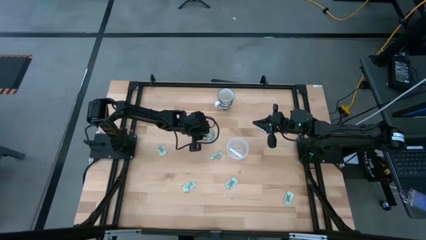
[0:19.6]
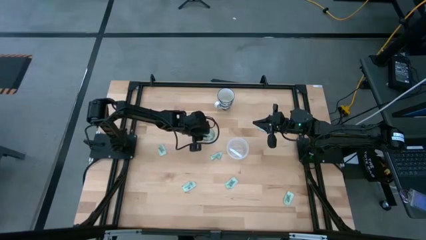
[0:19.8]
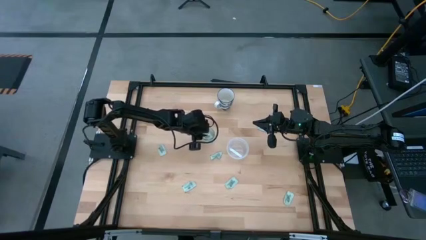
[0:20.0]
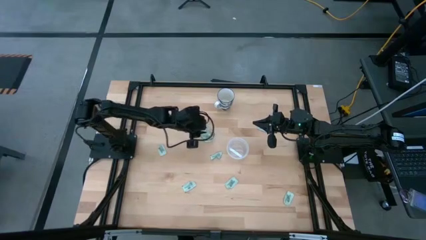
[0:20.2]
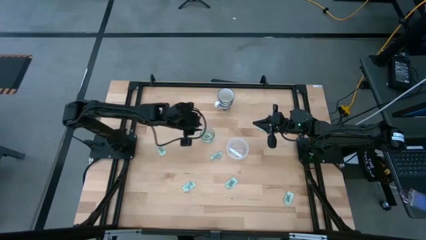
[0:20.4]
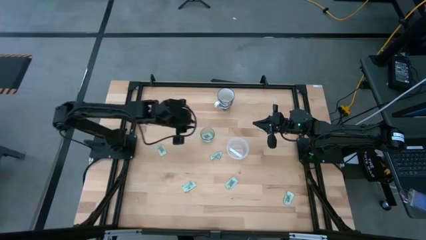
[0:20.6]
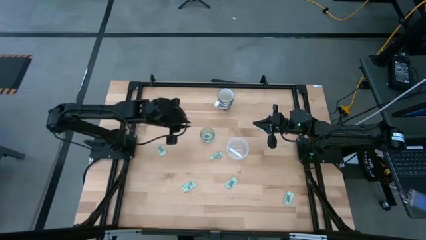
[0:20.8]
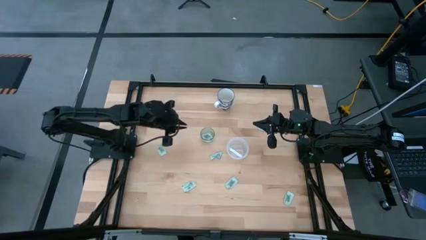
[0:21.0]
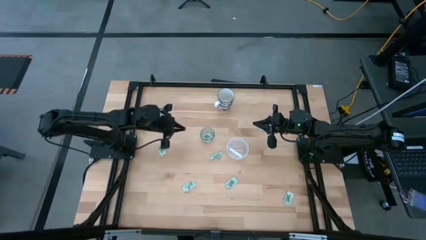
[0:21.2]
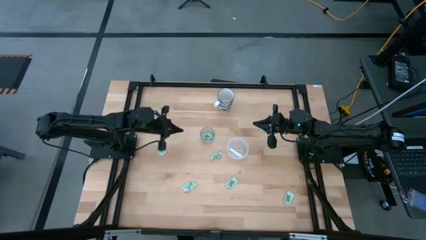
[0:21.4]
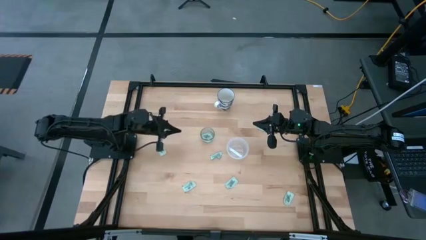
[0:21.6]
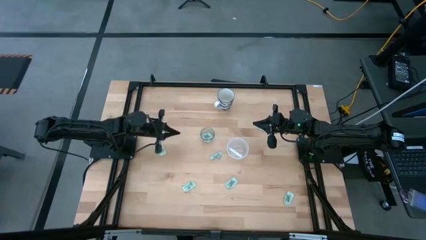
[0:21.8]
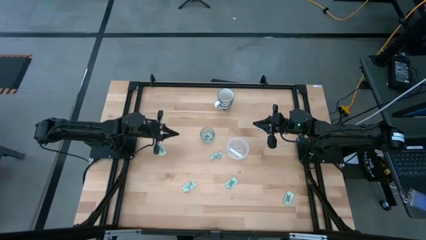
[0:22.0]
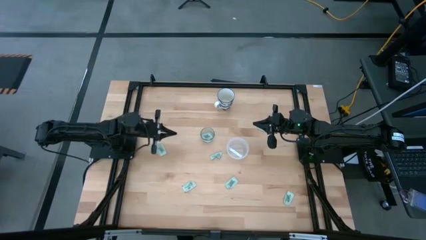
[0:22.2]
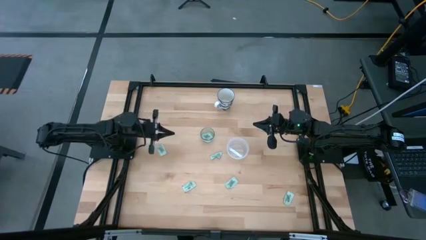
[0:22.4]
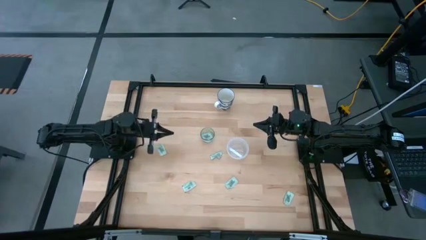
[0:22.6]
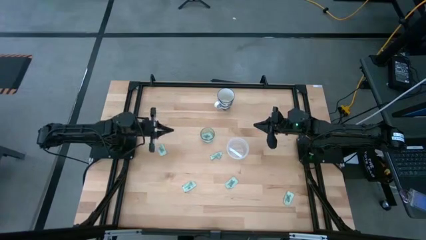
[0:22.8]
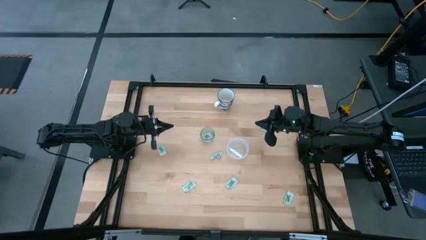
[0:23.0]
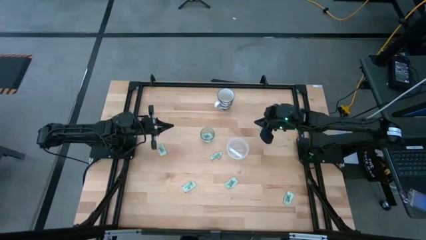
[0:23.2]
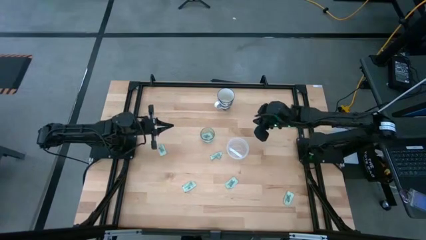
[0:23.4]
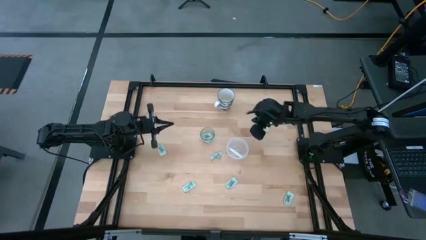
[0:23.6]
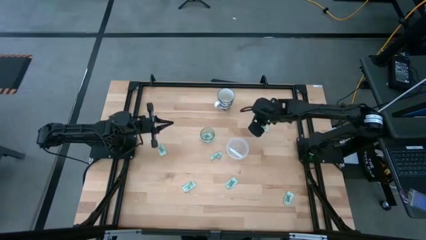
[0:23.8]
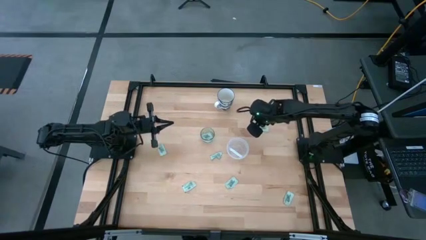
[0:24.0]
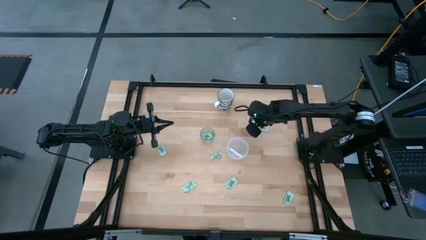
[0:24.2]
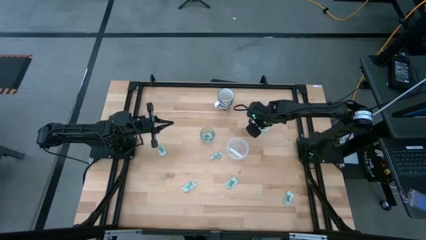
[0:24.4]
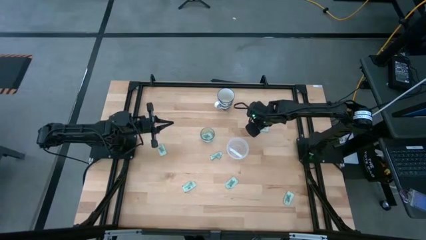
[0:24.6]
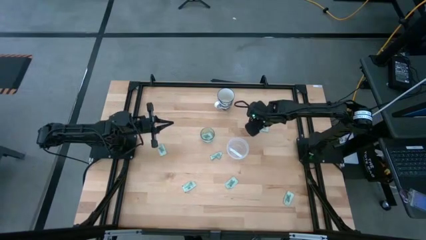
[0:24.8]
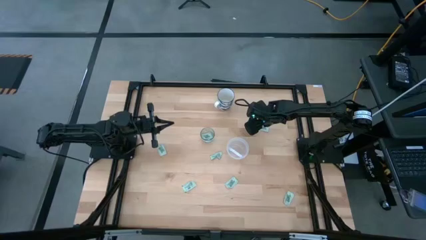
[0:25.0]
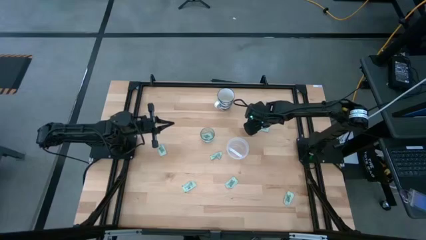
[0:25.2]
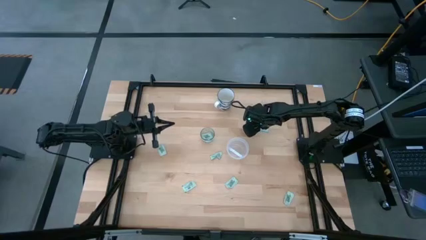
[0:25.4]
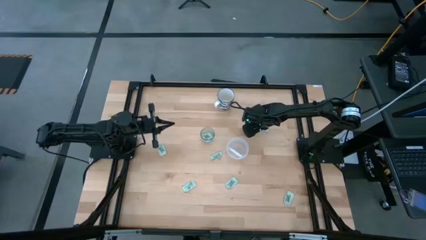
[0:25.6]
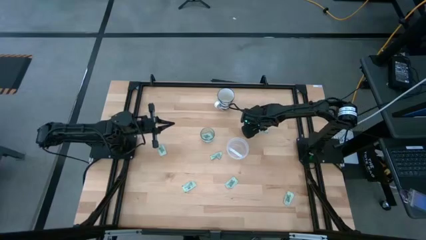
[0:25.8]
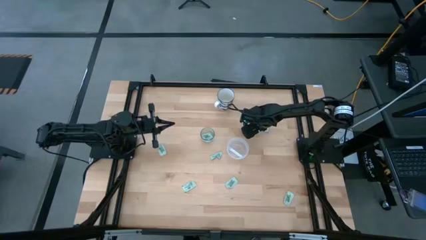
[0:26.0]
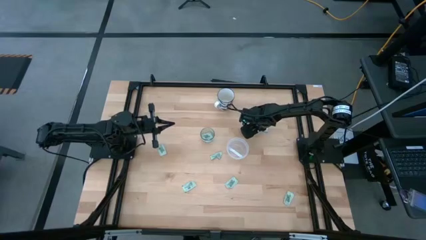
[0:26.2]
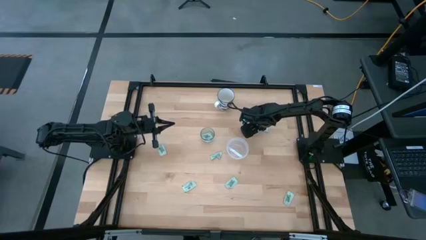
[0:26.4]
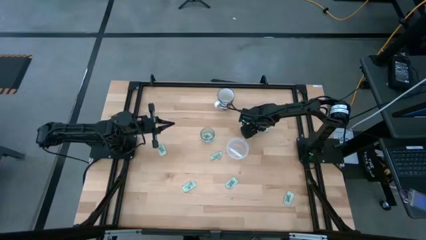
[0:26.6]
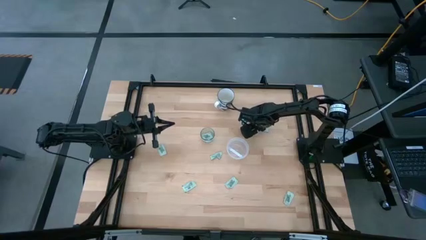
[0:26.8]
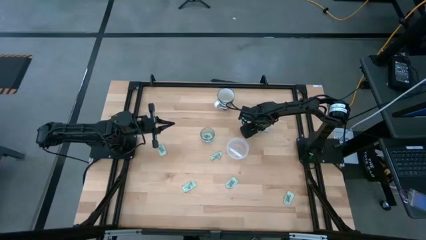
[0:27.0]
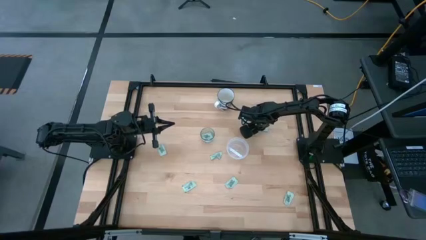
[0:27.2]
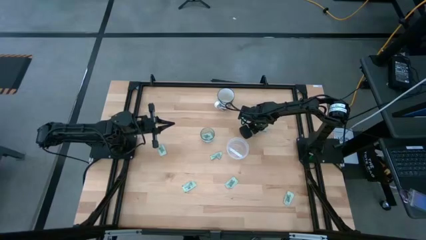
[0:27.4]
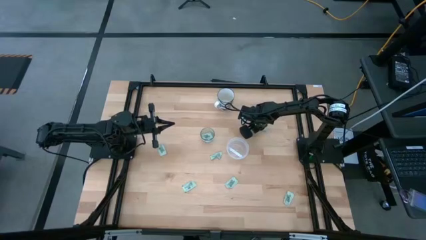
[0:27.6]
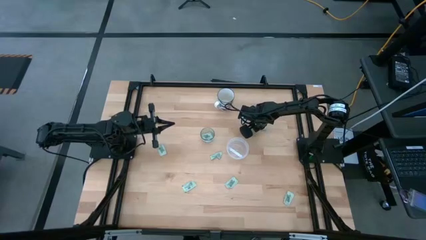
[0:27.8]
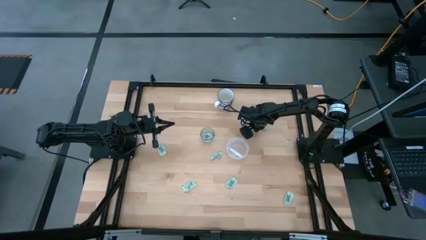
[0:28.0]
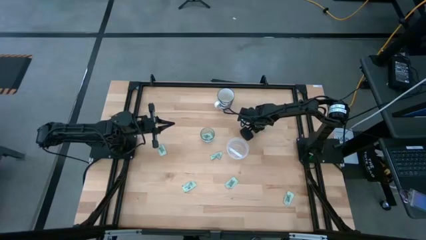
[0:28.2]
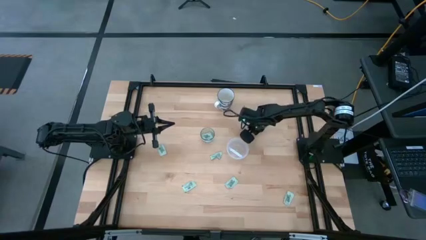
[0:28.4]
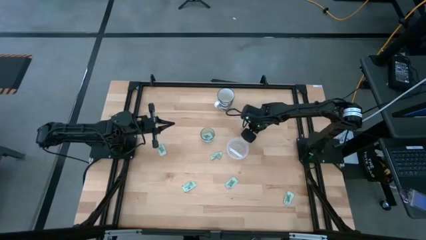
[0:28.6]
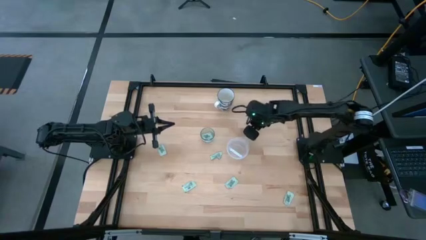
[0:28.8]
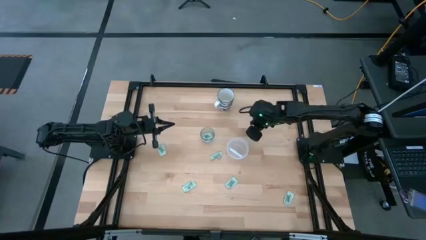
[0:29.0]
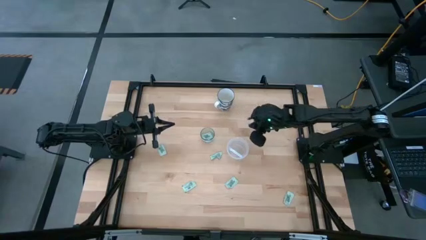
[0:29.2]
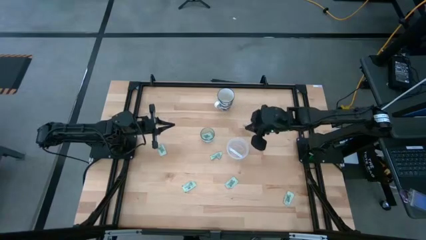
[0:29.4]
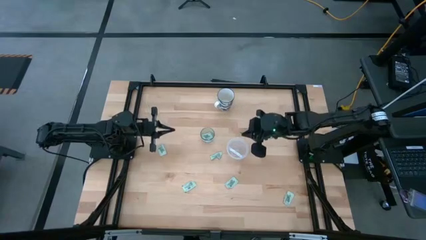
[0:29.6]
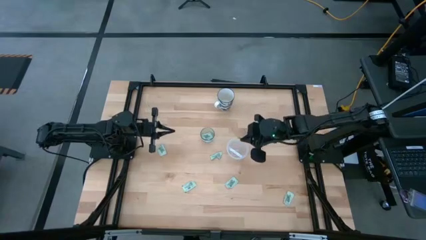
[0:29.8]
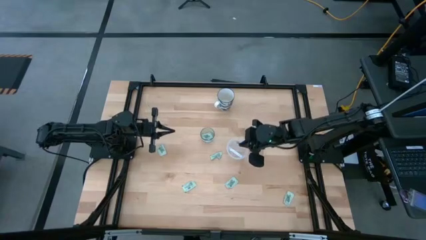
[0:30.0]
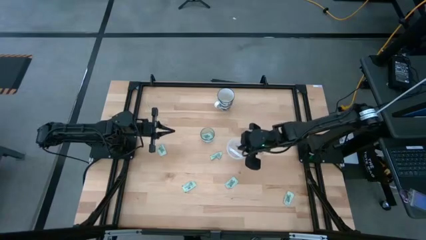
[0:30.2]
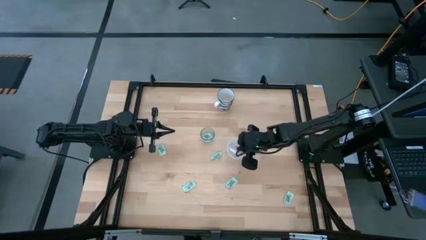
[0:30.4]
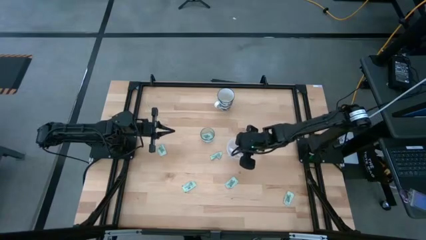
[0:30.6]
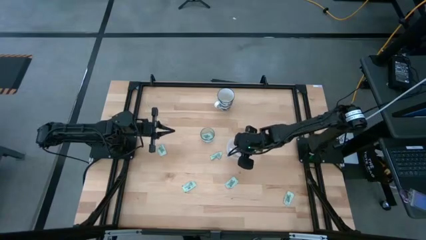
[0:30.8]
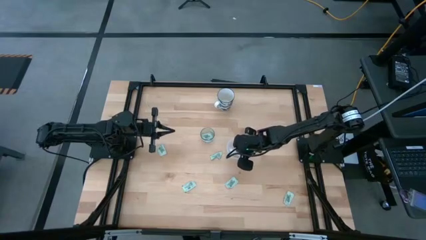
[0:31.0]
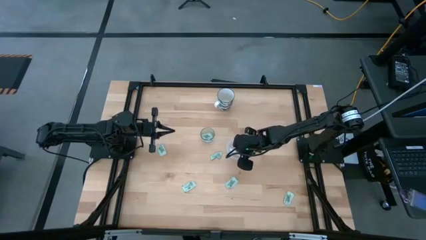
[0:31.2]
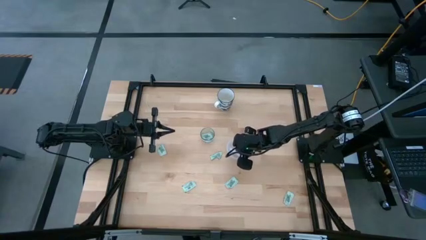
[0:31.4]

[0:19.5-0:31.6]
Task: Pick and place Stevia / Truvia into bins
Put the stevia packet into the transparent container

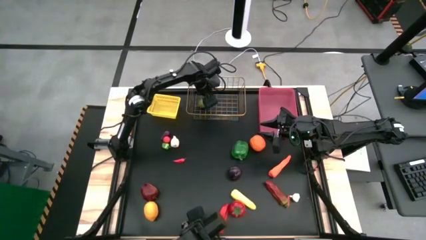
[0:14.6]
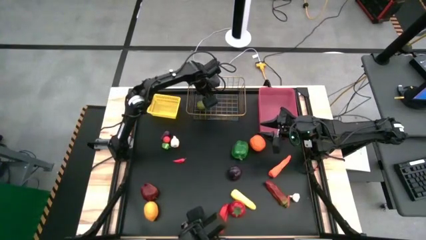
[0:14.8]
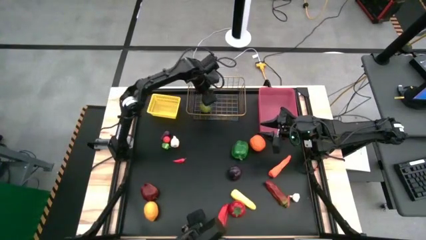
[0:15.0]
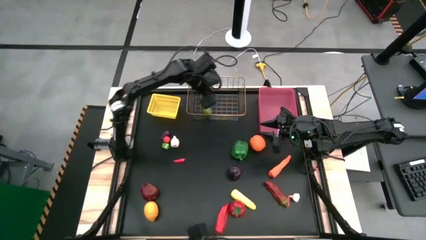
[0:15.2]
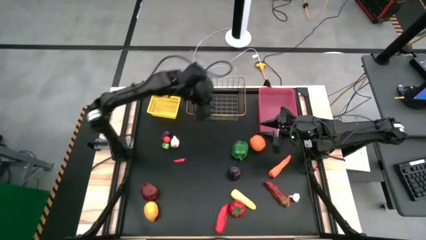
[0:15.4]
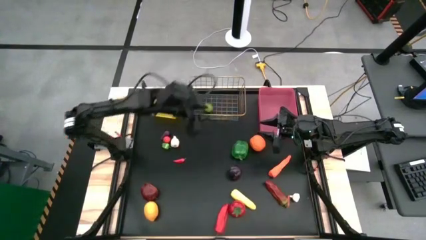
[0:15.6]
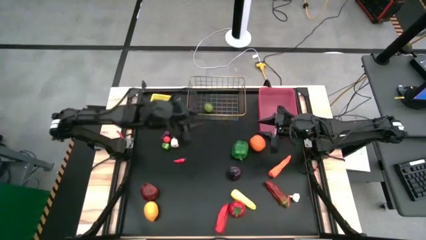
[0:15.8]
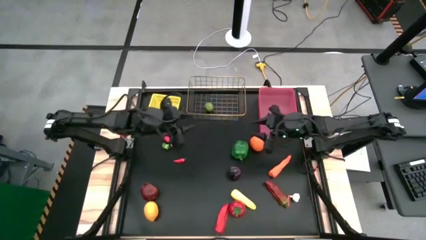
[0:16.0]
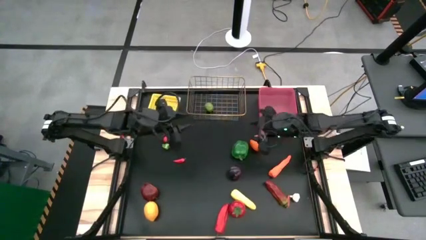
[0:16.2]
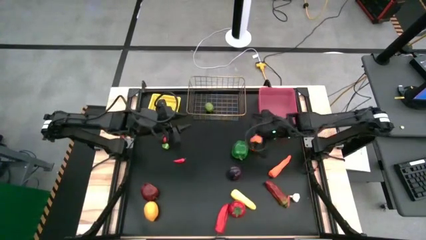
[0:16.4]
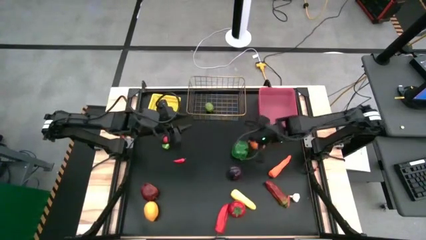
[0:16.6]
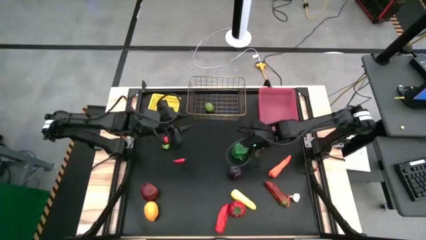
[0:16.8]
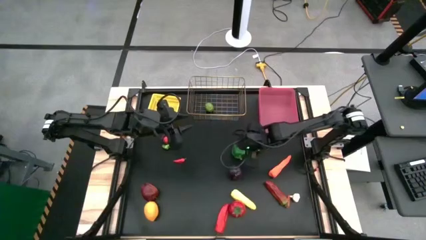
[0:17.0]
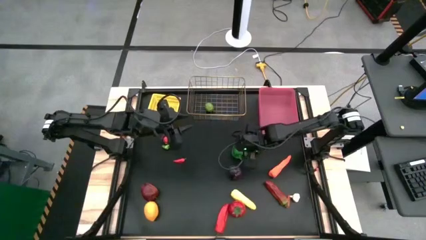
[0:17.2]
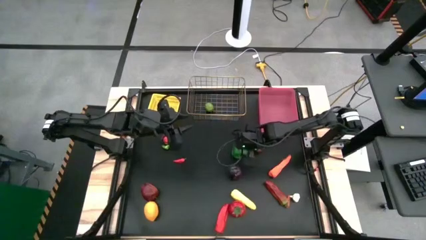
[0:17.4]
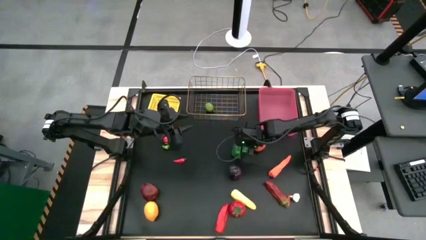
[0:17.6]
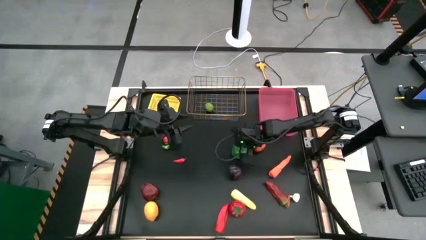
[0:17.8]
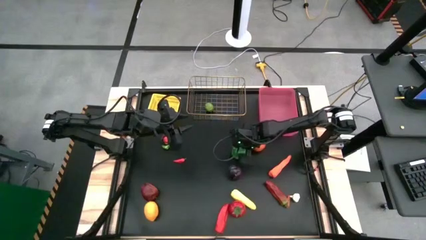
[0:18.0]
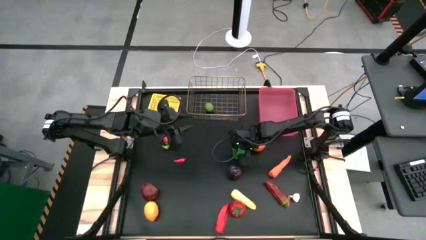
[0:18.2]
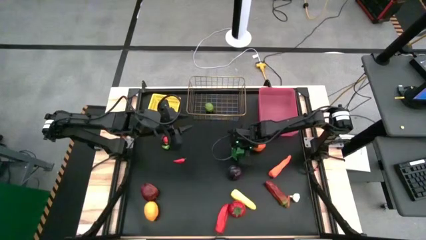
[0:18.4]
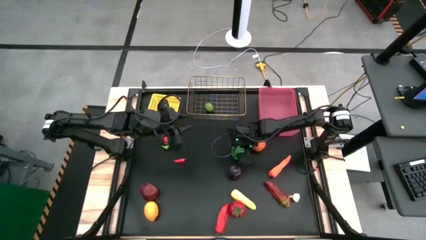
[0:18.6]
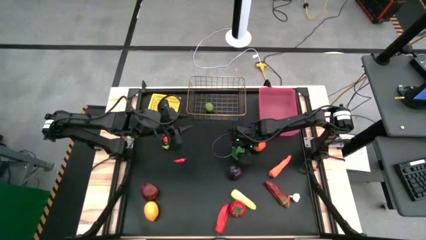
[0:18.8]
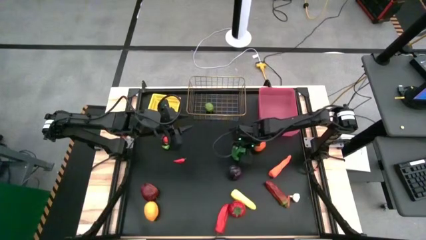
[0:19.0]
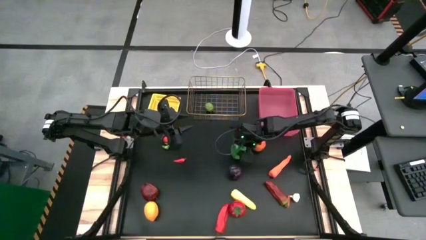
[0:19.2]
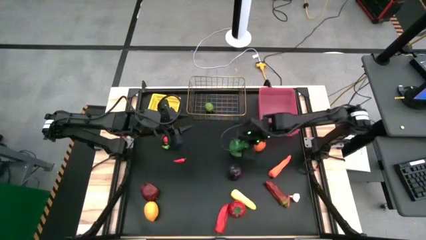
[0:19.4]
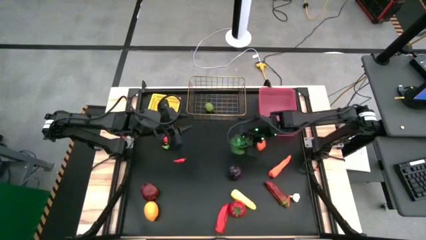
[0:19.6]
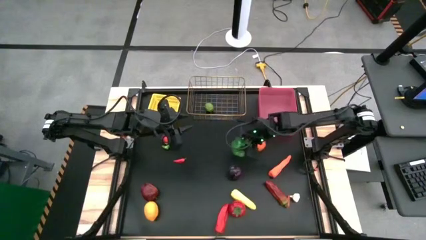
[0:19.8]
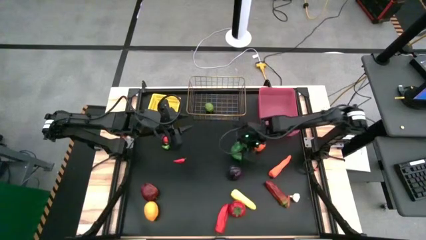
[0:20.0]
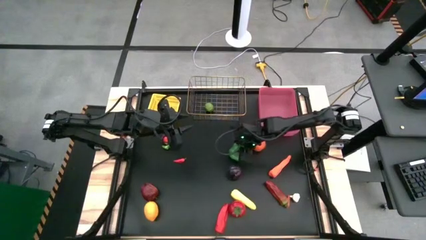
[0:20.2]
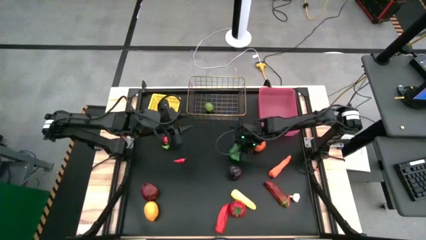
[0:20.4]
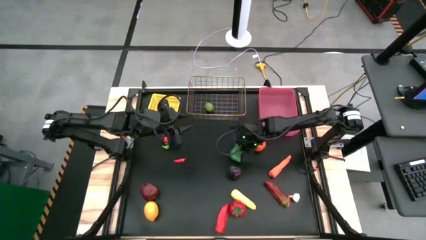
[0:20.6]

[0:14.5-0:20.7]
Task: Sort produce into baskets
Put the large green bell pepper into the pink bin
